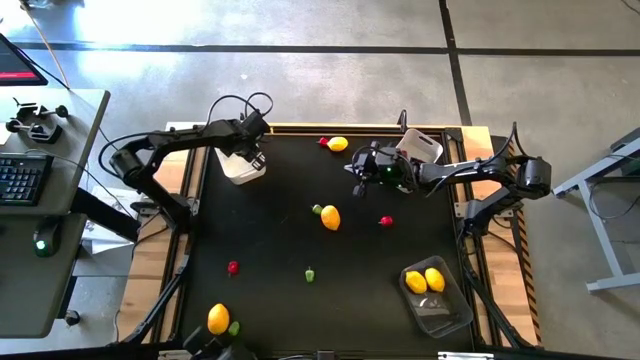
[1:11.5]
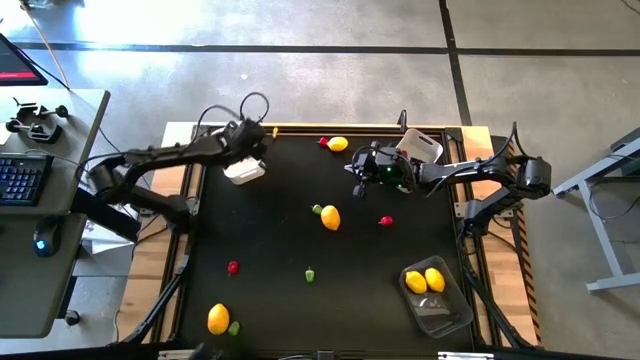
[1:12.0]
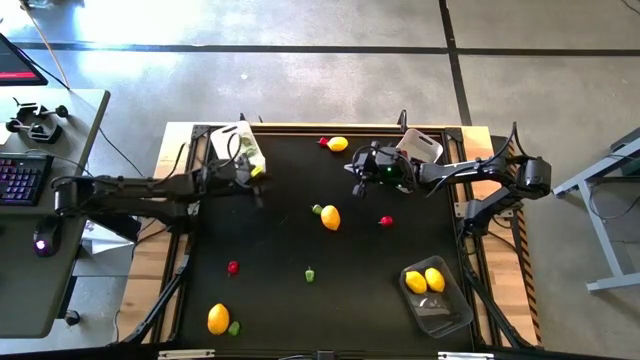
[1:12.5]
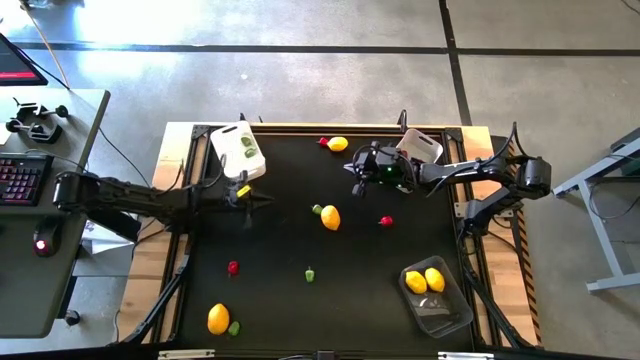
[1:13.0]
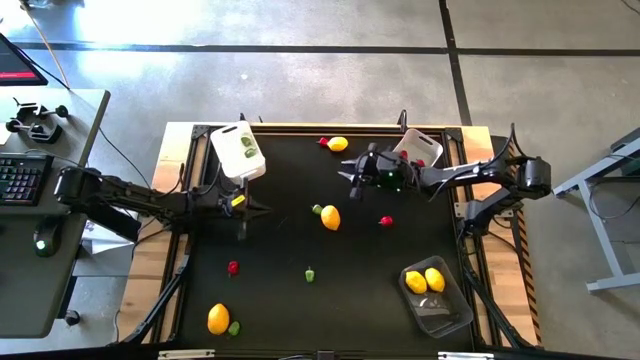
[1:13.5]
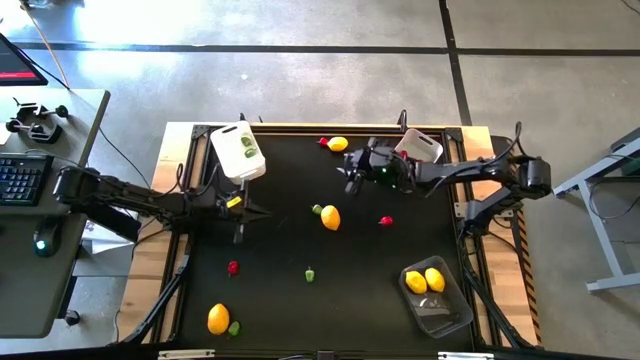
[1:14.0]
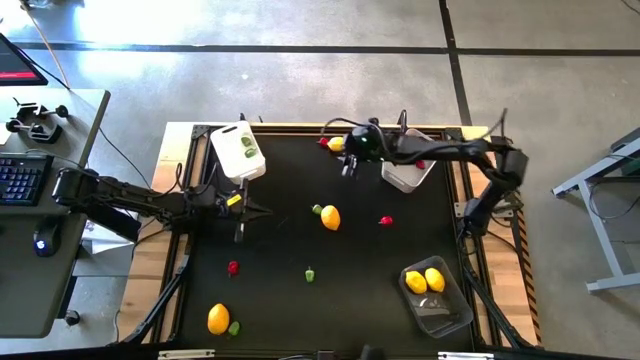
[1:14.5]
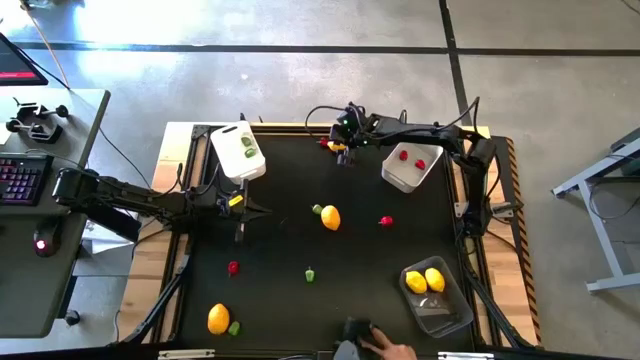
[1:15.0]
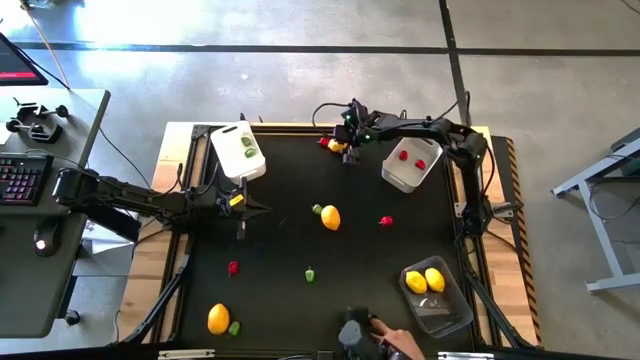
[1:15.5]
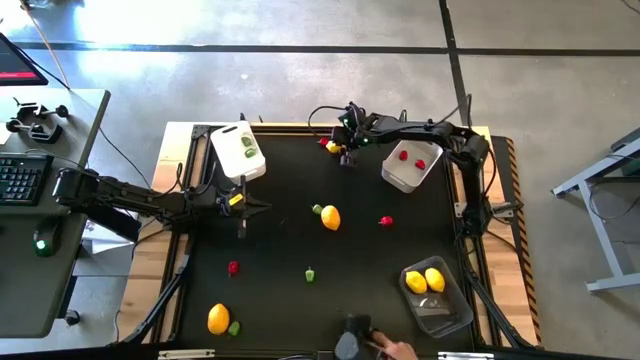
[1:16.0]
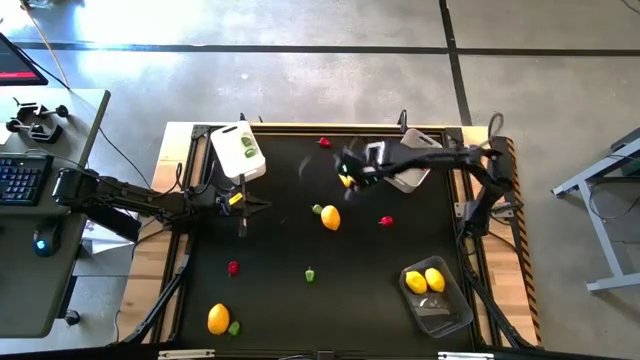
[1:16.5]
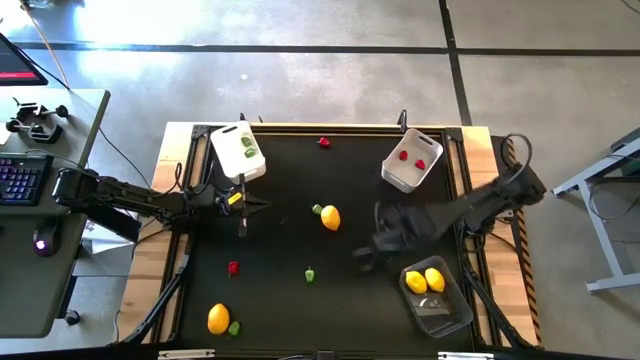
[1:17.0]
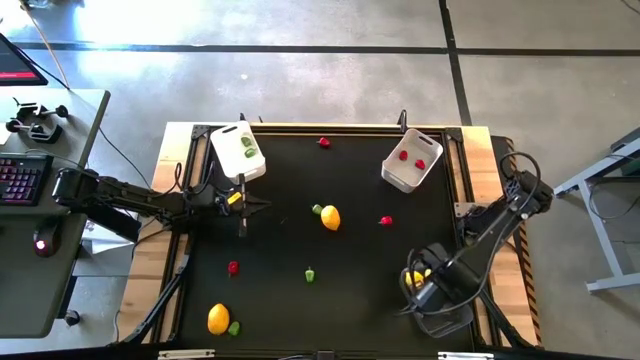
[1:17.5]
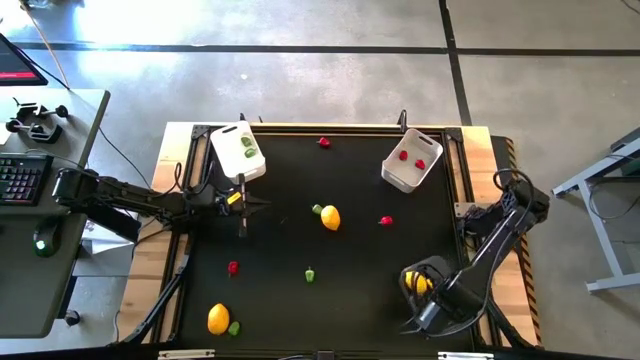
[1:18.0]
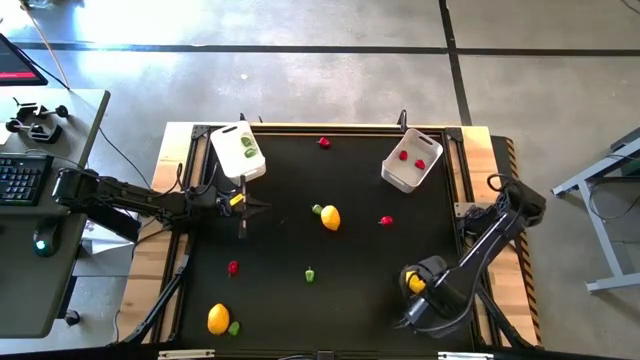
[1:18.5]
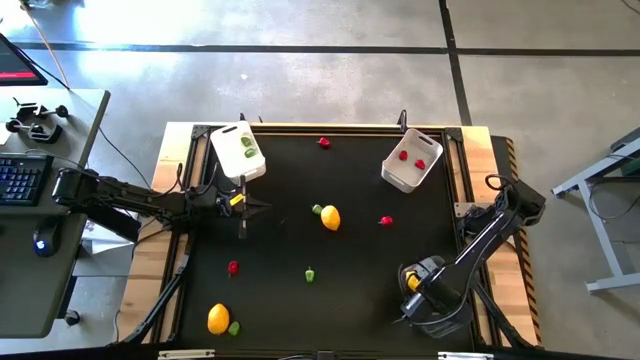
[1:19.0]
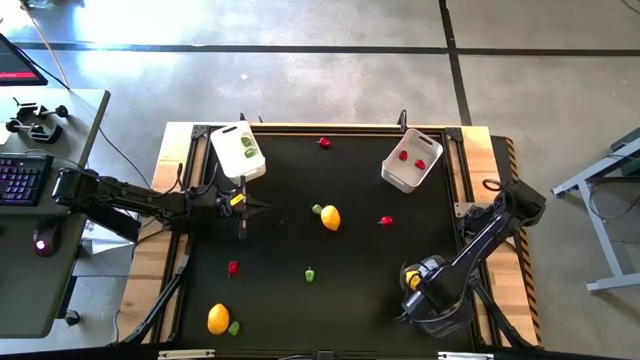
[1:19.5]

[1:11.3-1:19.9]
Task: Sort produce into baskets
Put the yellow lemon into the transparent bin

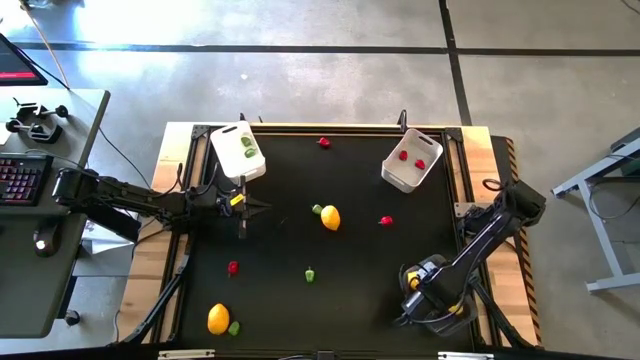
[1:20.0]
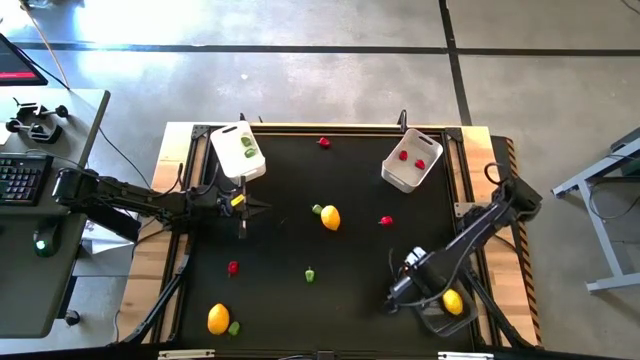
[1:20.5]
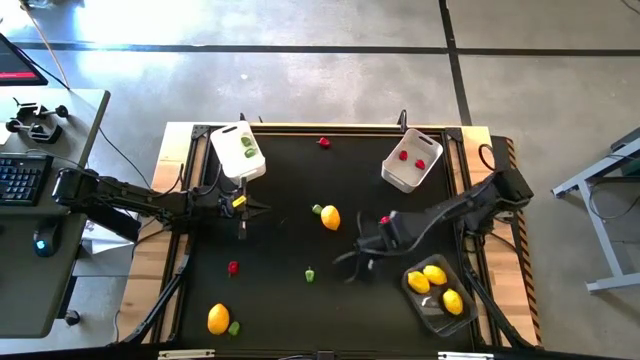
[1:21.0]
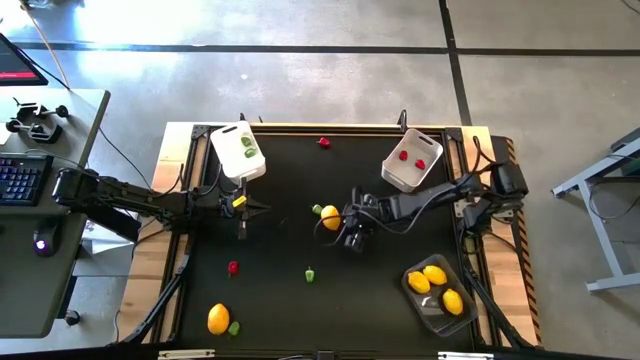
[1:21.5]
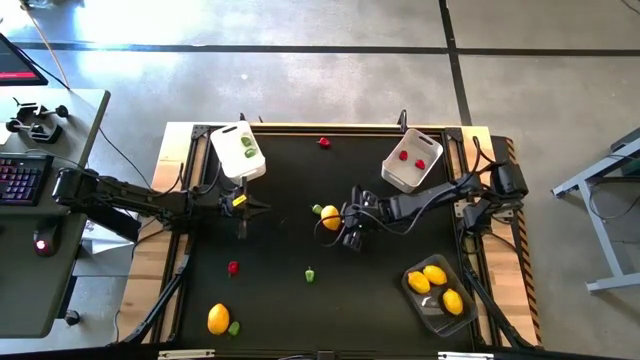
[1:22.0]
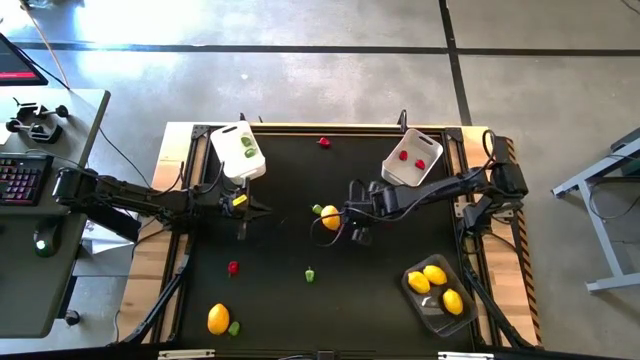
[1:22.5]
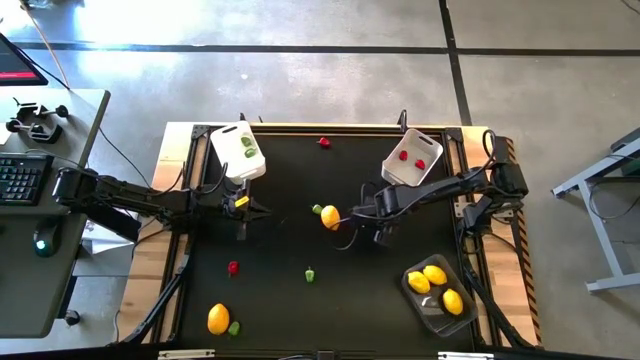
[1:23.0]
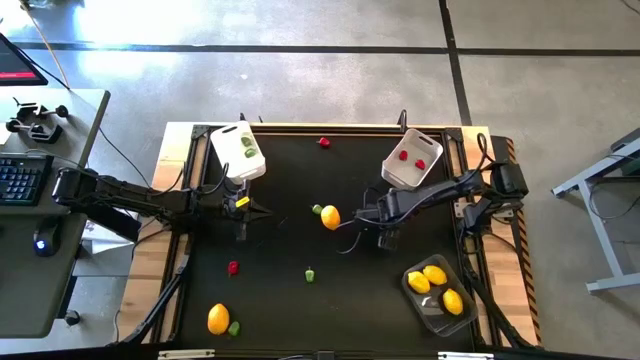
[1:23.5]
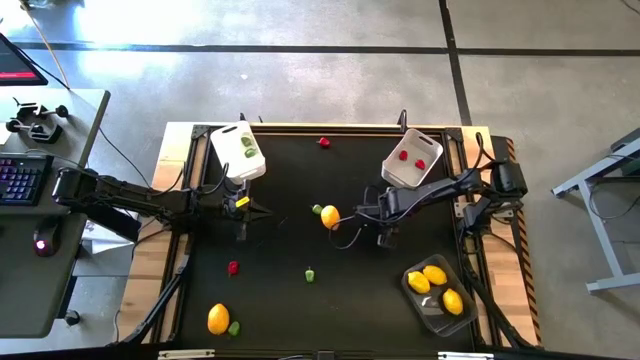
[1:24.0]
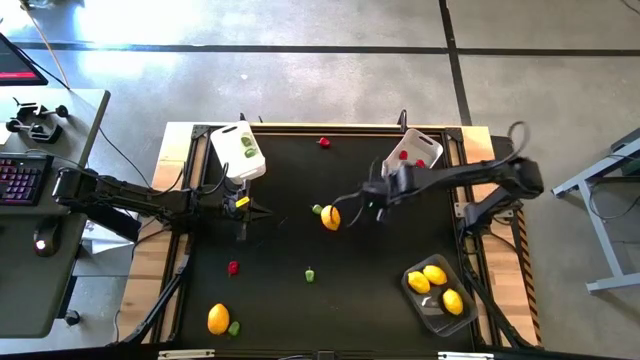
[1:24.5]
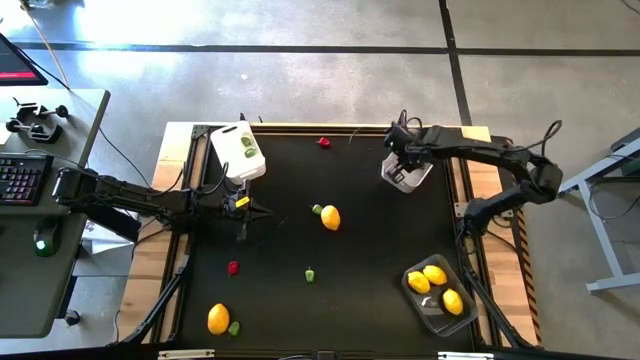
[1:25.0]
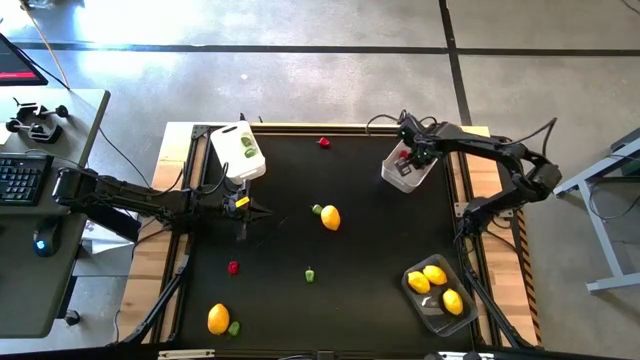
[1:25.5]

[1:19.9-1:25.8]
Put the red chili pepper into the gray bin

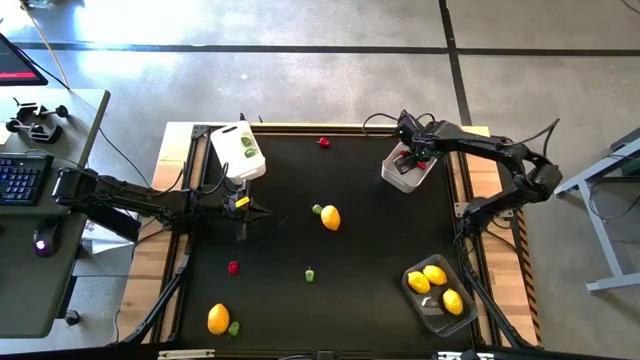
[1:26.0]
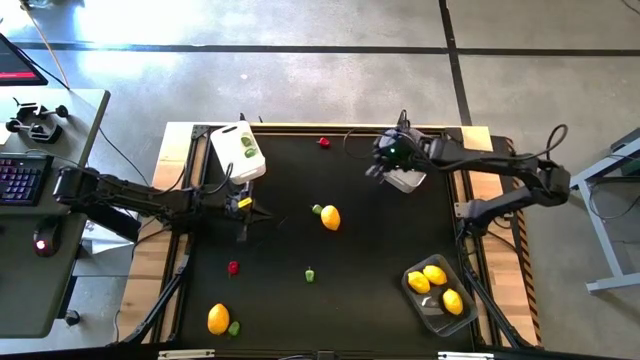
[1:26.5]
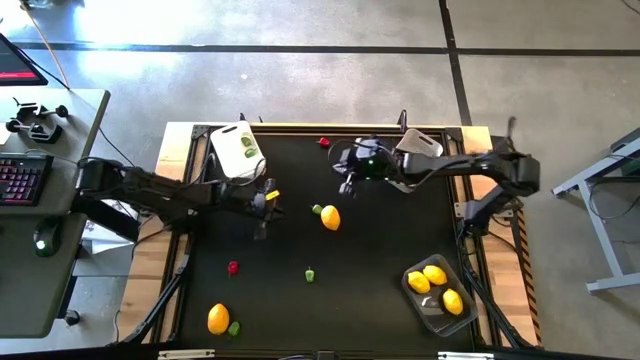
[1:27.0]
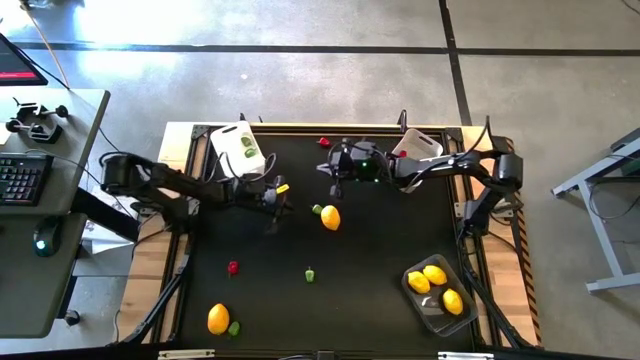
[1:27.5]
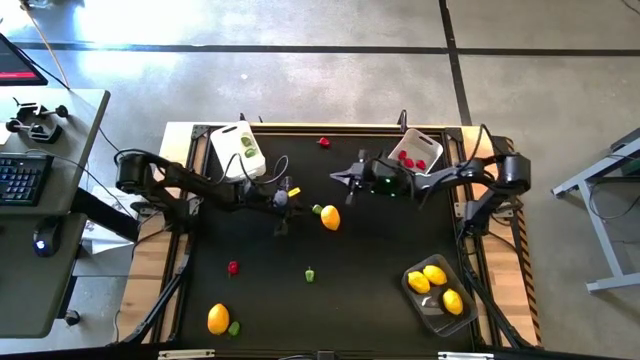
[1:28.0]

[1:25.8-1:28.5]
Put the green chili pepper into the white bin

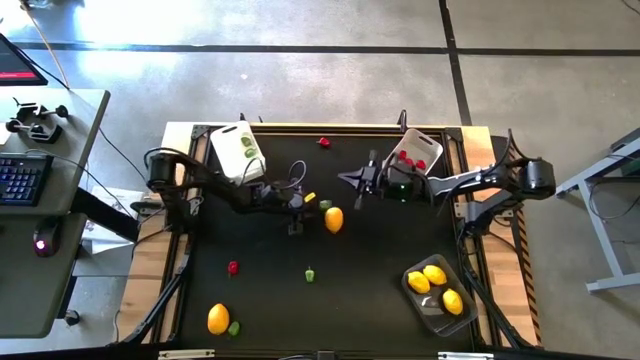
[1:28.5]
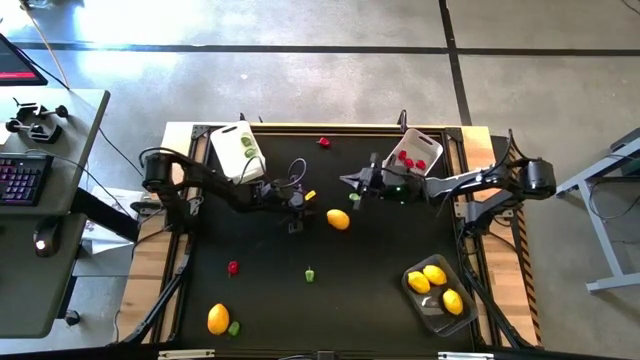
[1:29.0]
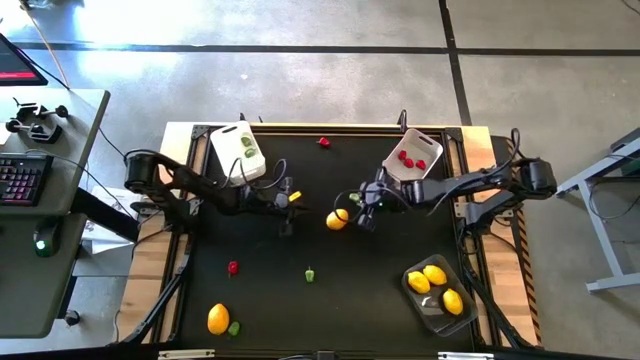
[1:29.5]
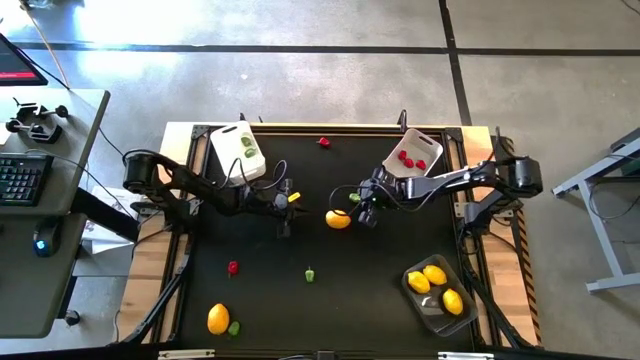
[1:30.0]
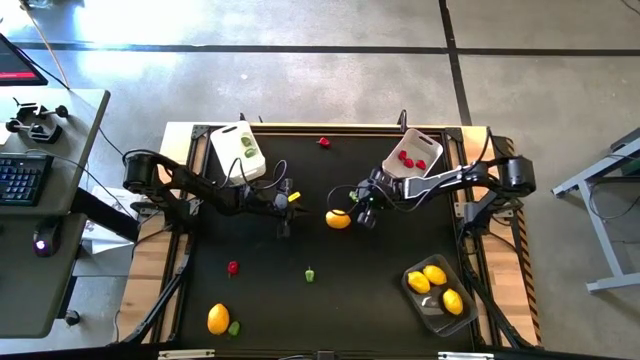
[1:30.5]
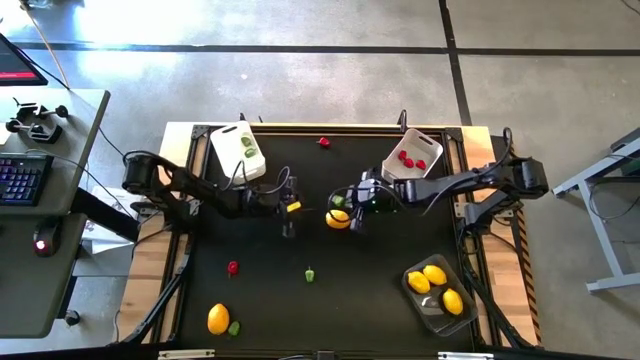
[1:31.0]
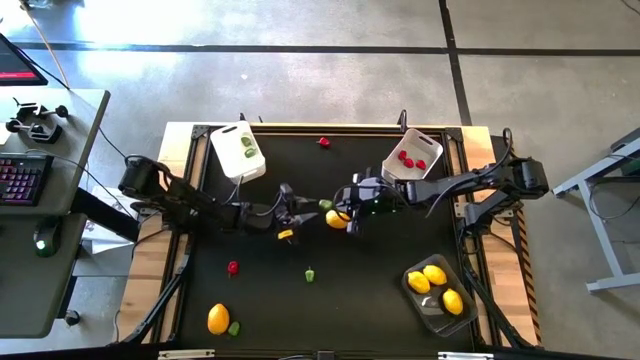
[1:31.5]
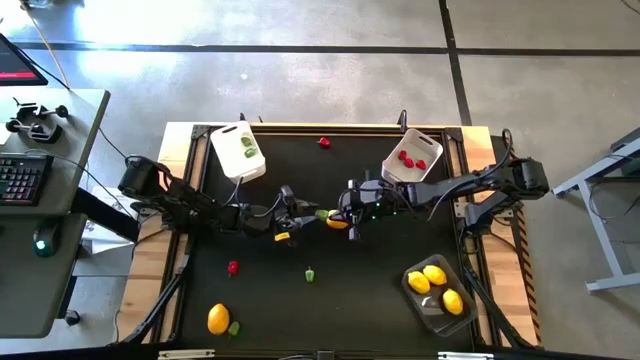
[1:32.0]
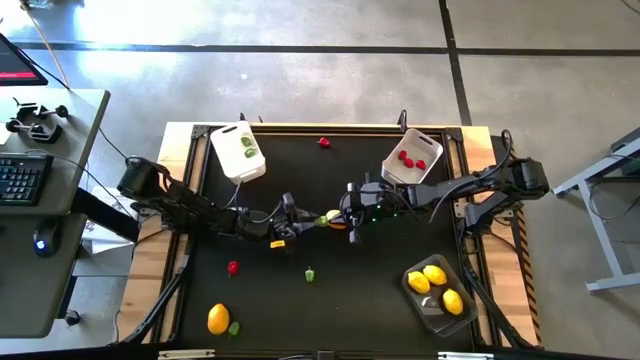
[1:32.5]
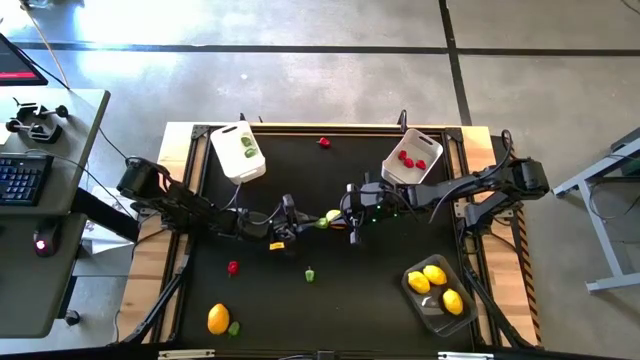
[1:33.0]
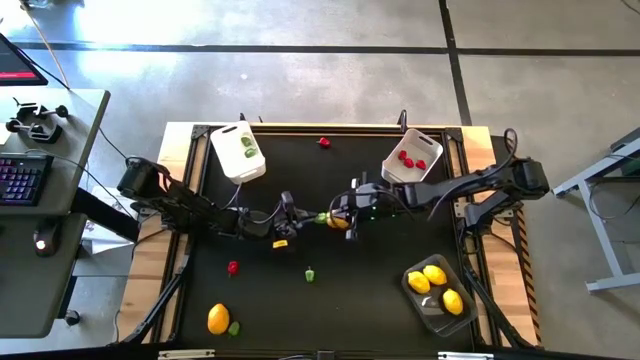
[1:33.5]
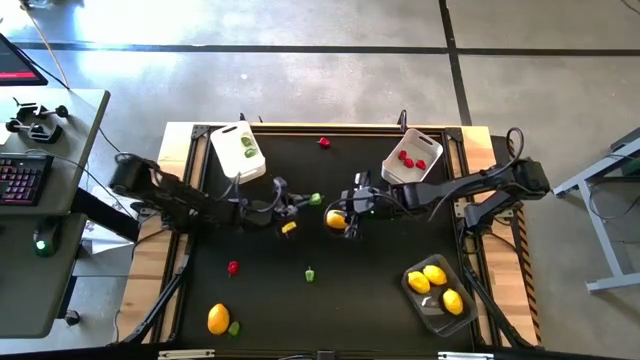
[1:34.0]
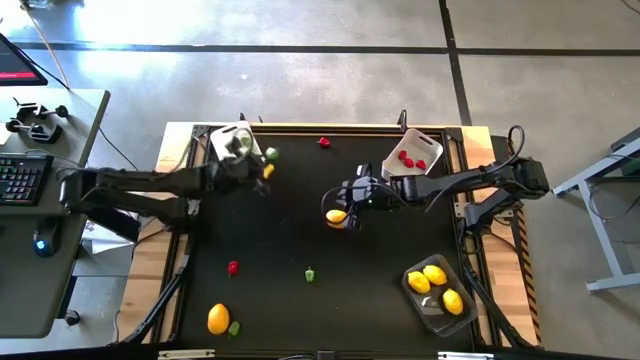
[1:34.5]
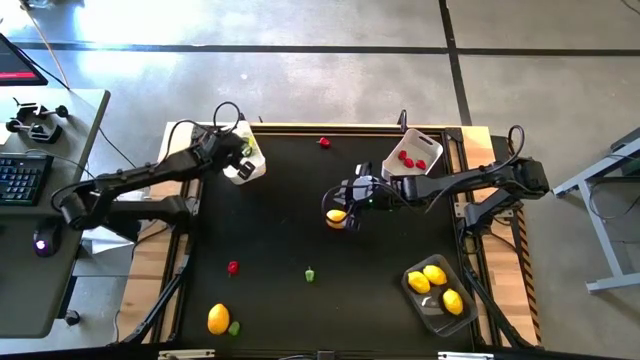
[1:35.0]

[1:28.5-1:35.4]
Put the green chili pepper into the white bin
